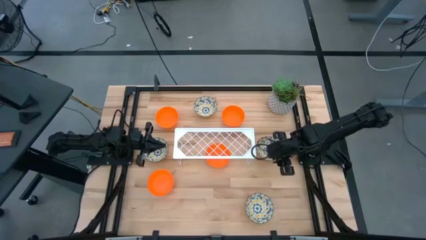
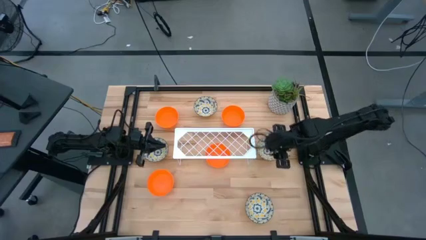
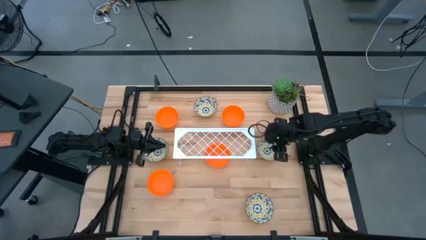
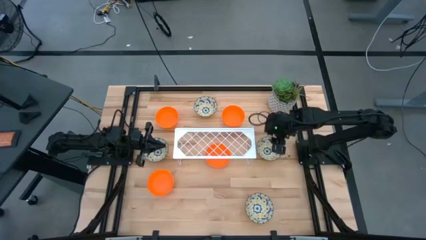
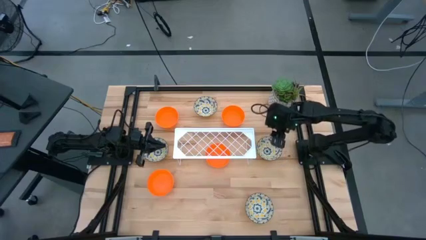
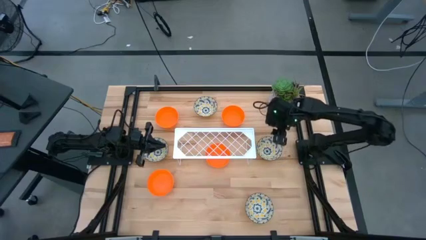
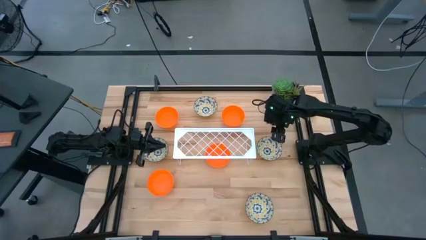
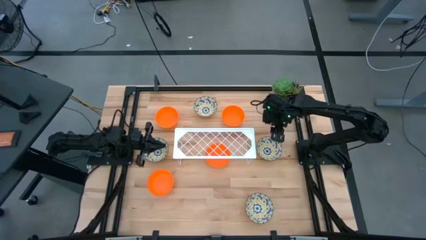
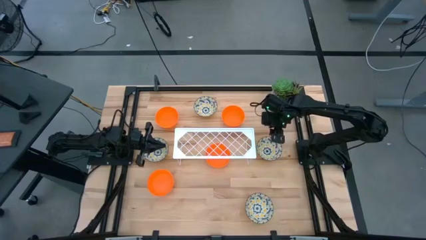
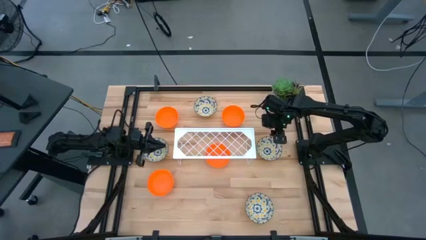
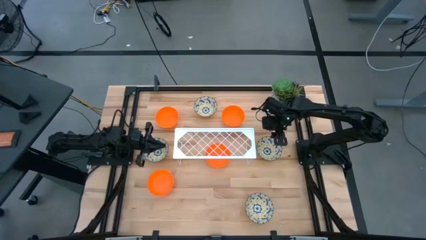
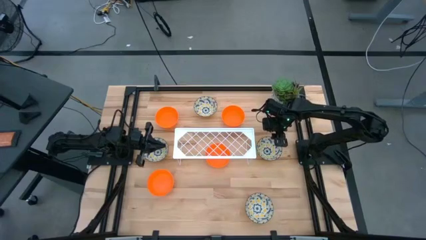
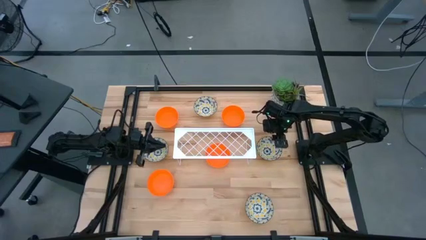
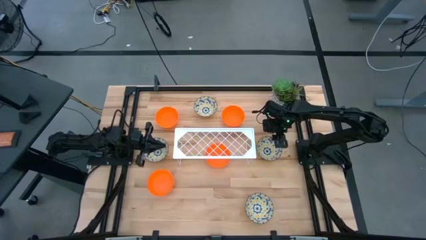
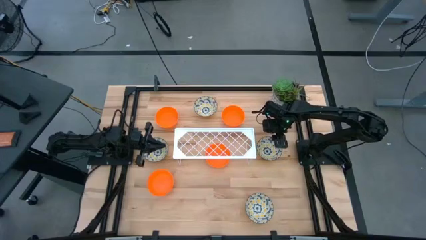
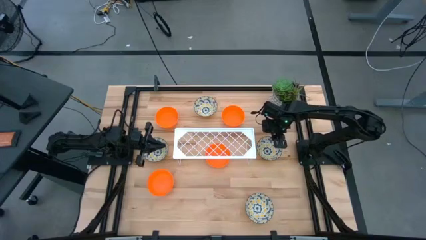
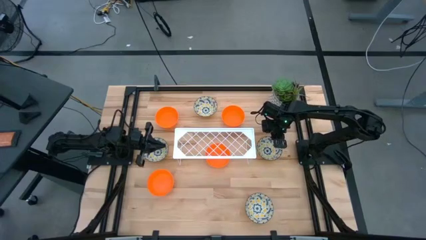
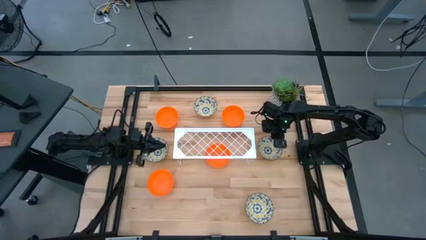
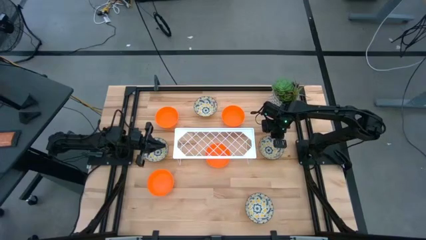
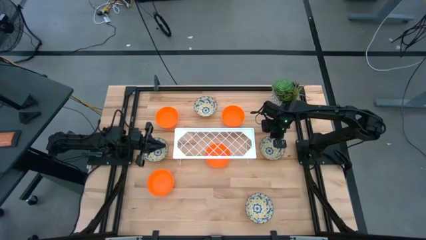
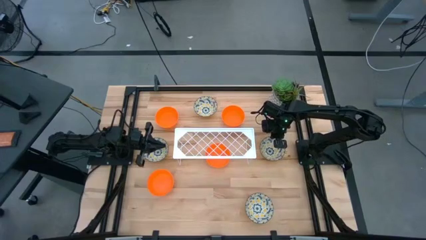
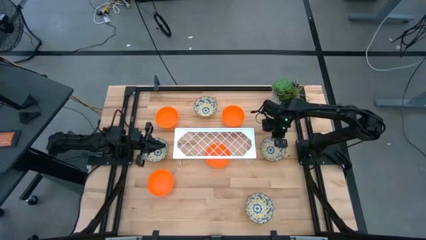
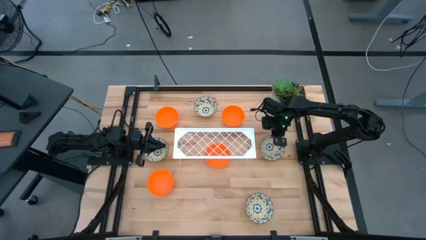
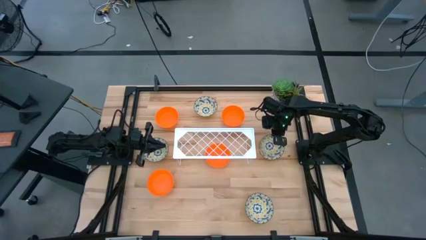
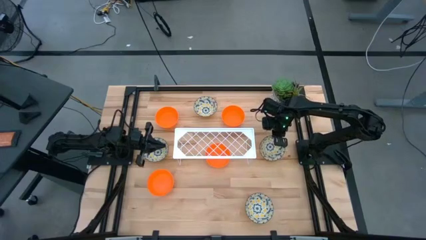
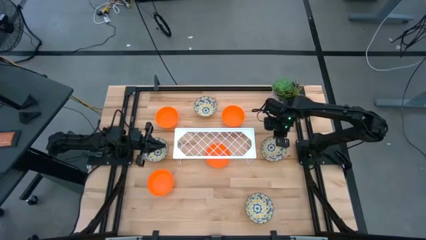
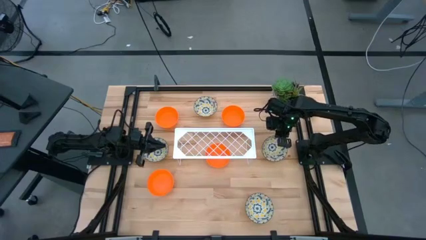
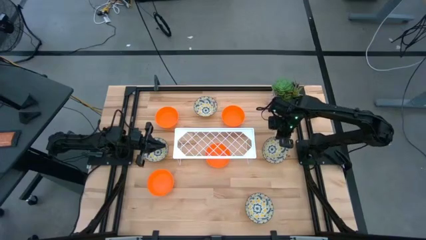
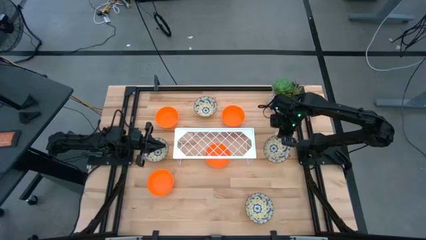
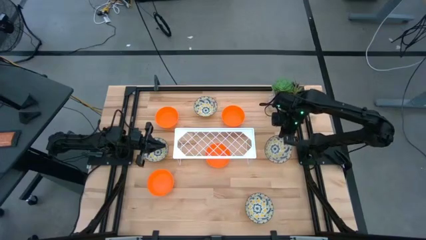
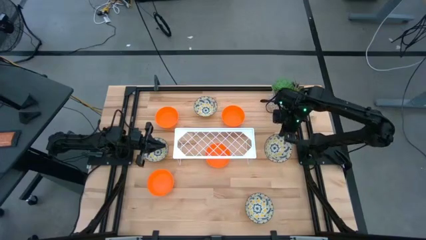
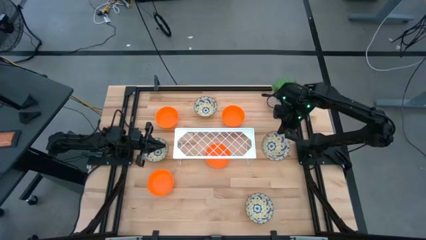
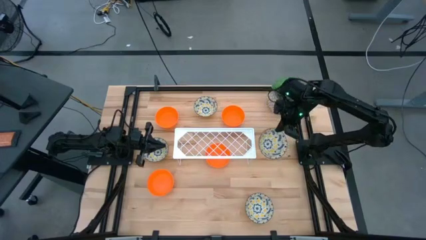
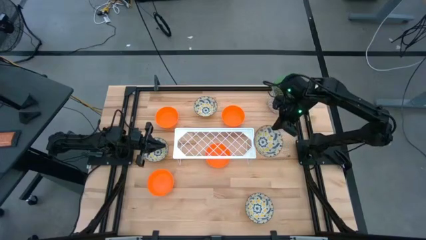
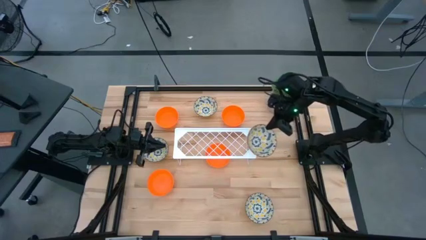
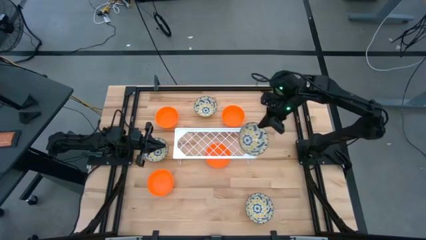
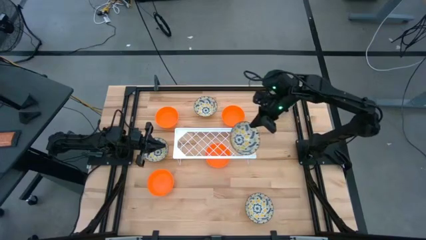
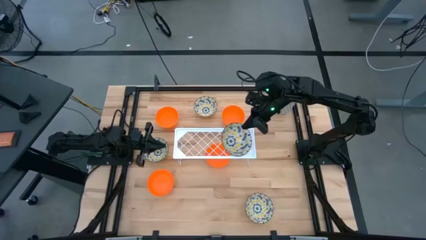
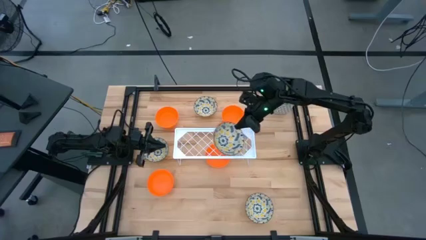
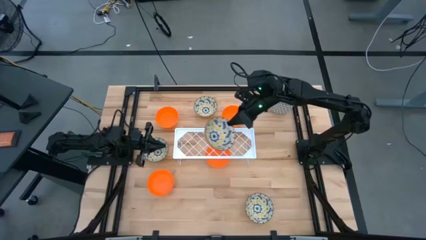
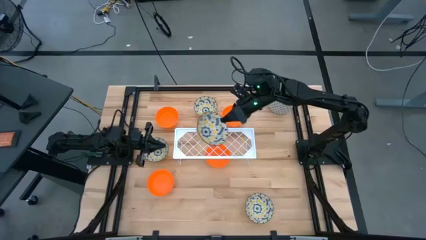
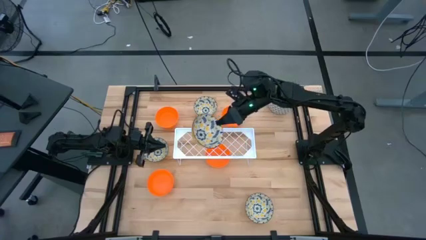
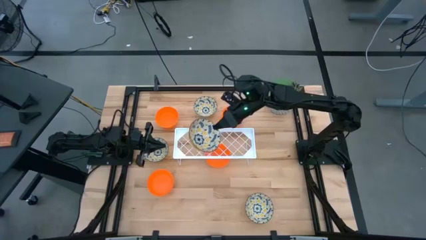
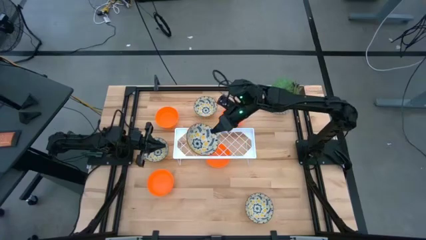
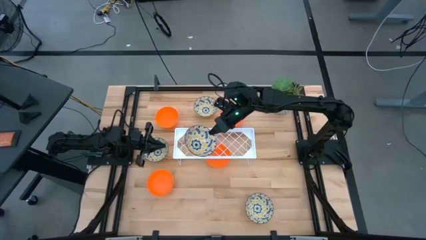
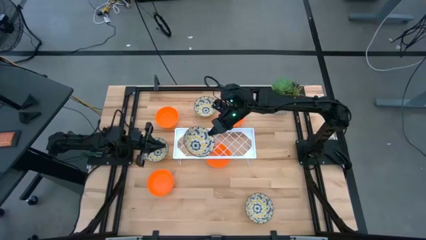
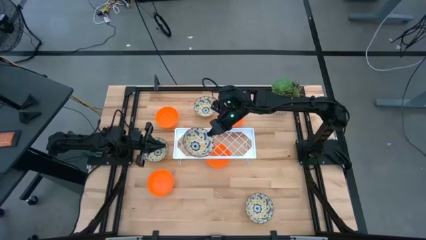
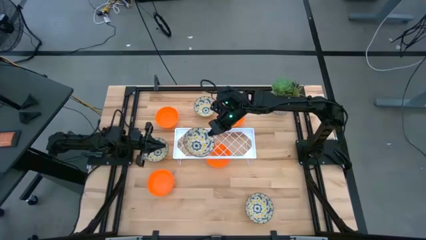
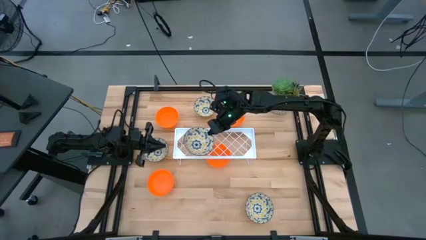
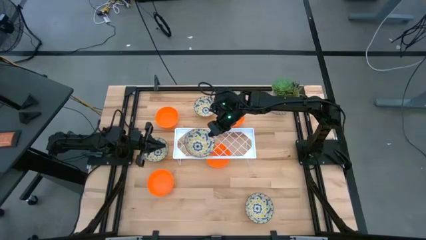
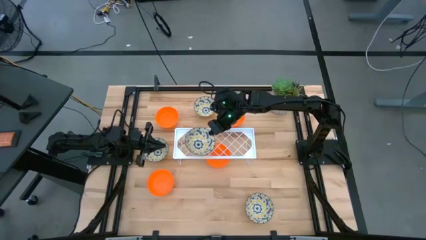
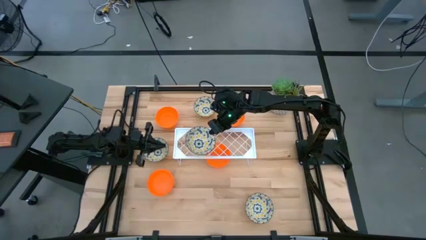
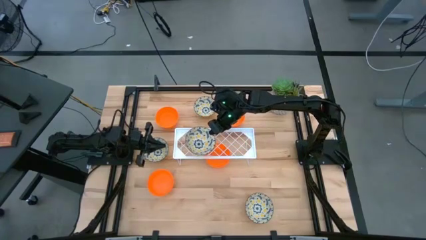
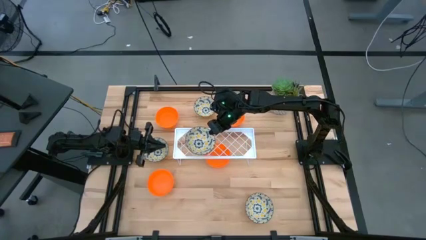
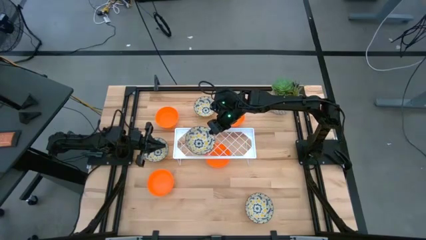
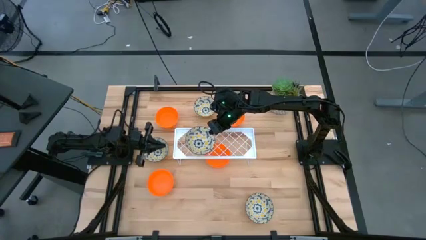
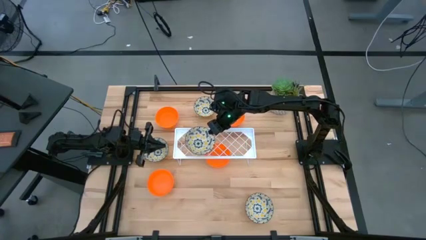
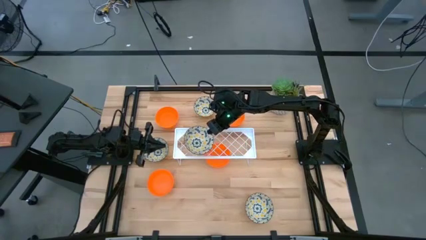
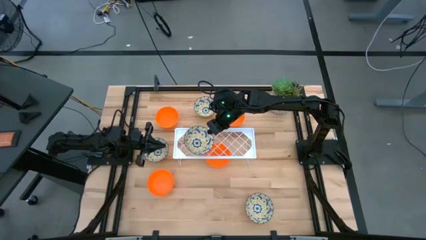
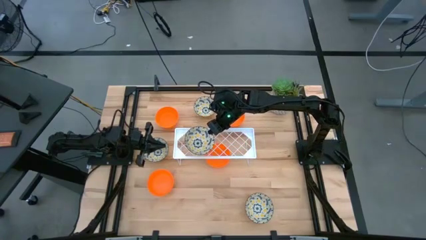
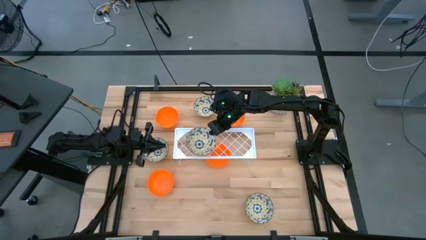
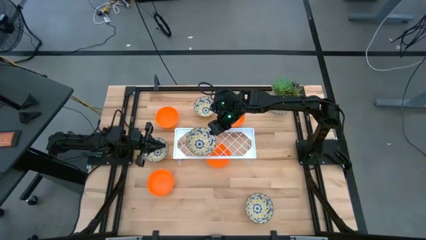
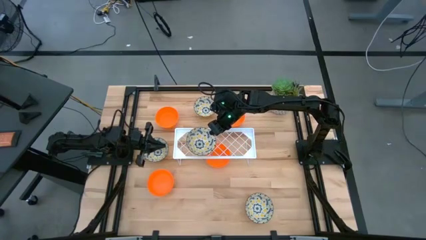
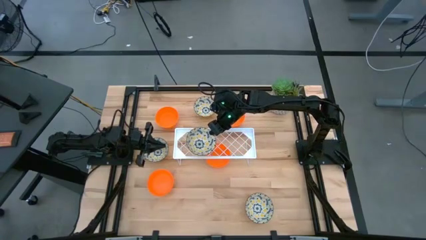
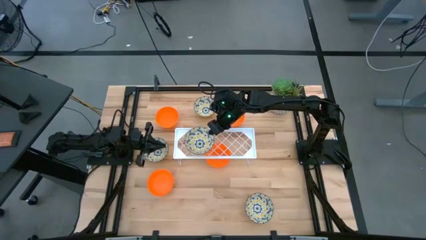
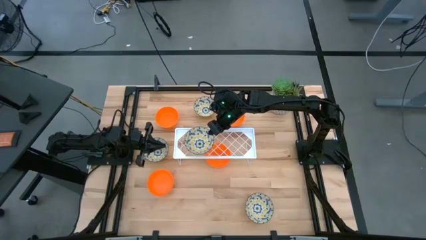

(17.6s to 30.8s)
Task: Pick & Place Mini bowls
Put the white patterned bowl on the shelf
